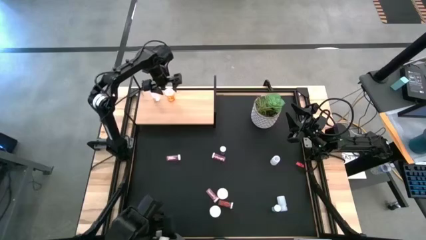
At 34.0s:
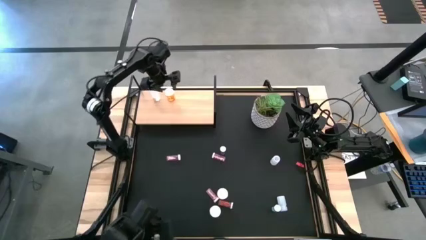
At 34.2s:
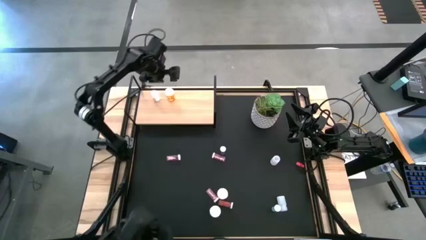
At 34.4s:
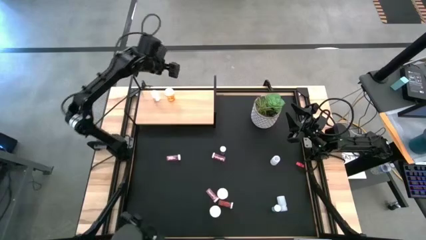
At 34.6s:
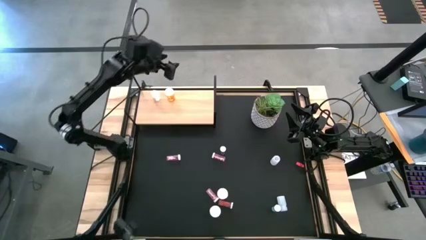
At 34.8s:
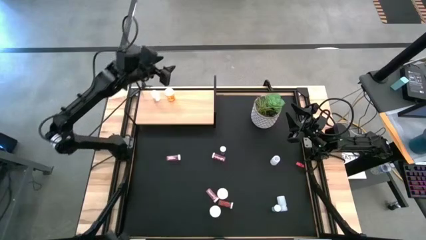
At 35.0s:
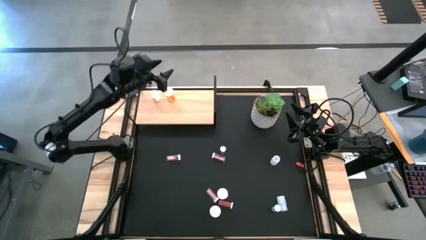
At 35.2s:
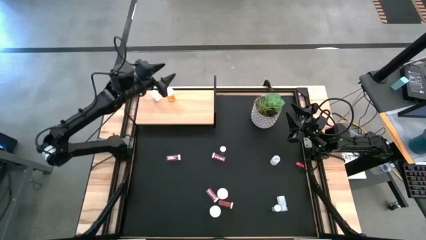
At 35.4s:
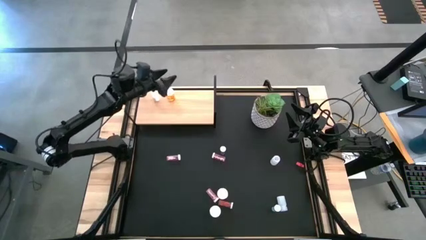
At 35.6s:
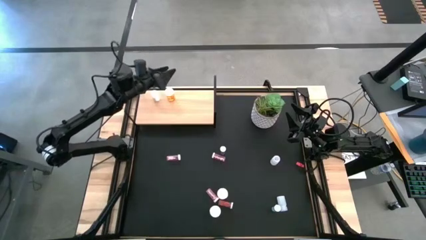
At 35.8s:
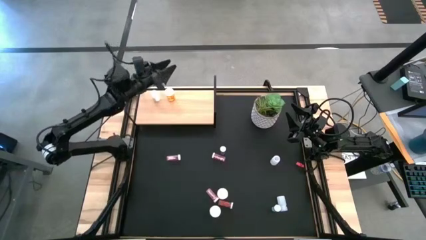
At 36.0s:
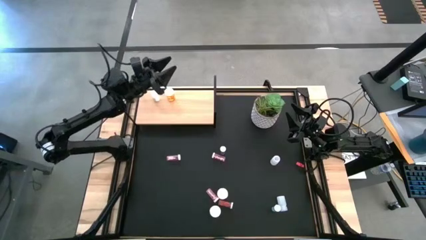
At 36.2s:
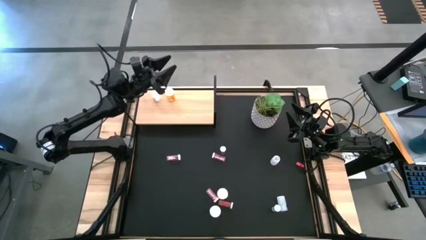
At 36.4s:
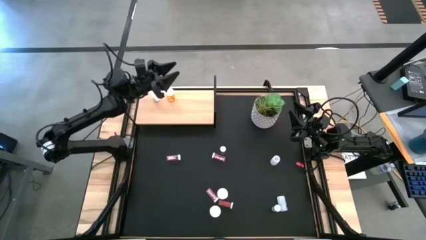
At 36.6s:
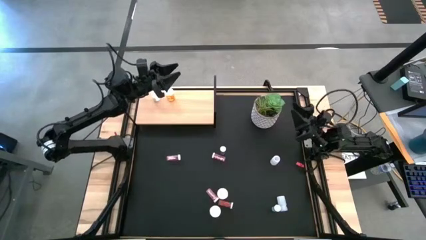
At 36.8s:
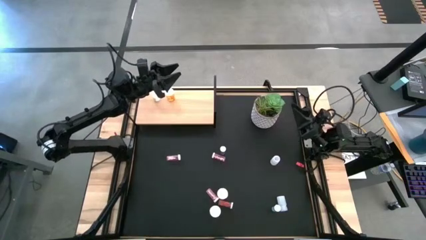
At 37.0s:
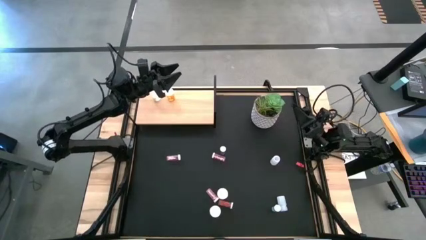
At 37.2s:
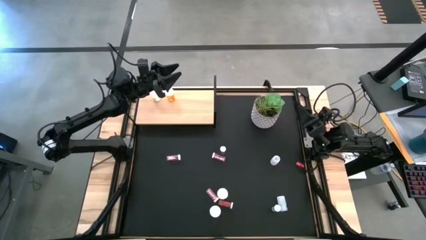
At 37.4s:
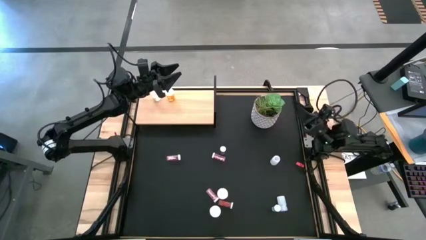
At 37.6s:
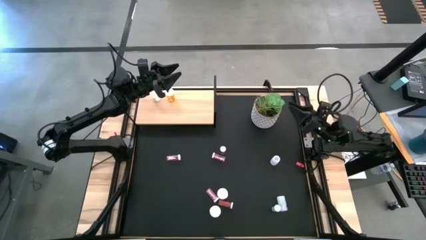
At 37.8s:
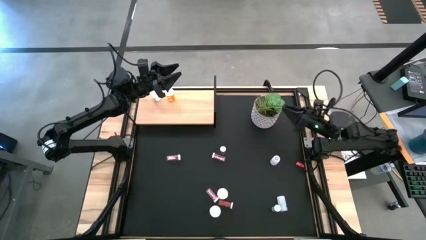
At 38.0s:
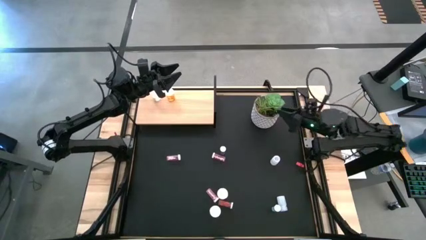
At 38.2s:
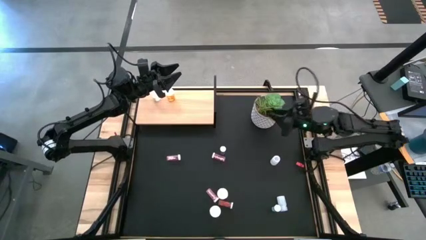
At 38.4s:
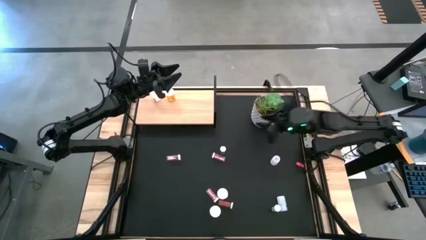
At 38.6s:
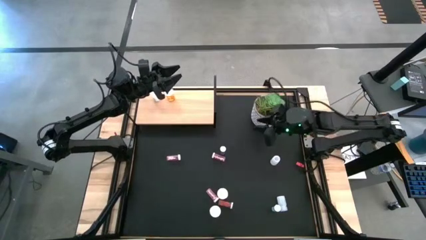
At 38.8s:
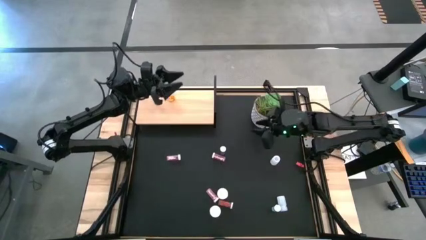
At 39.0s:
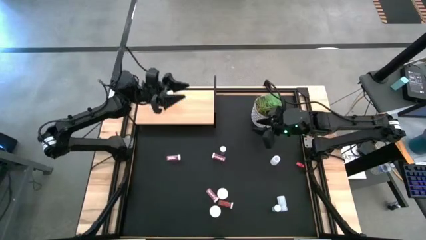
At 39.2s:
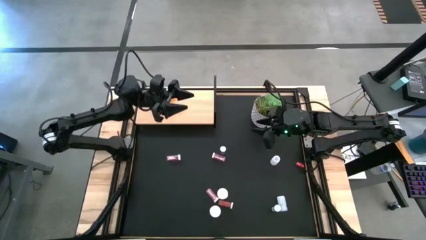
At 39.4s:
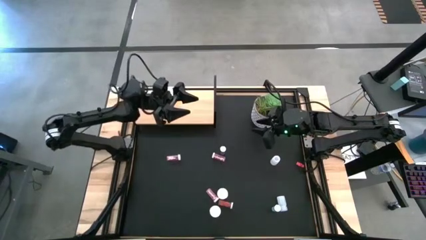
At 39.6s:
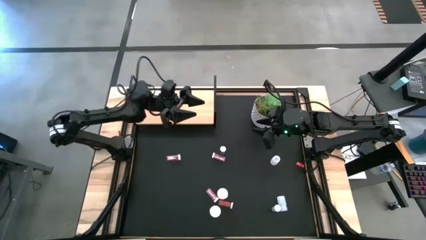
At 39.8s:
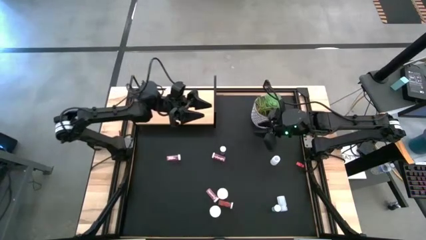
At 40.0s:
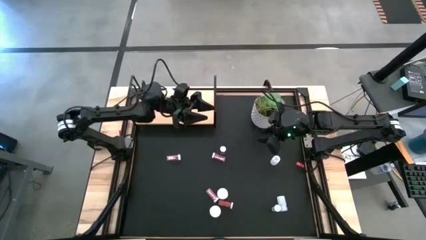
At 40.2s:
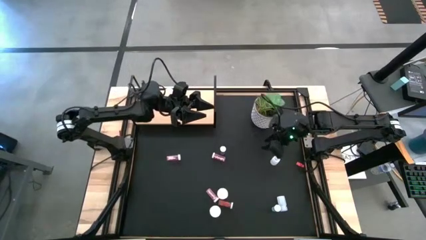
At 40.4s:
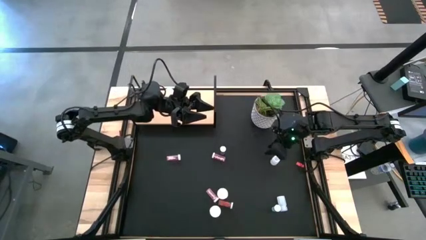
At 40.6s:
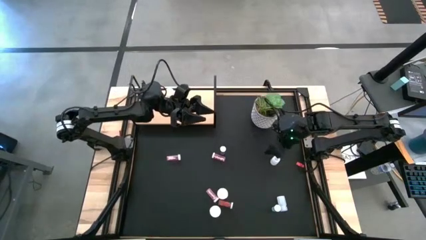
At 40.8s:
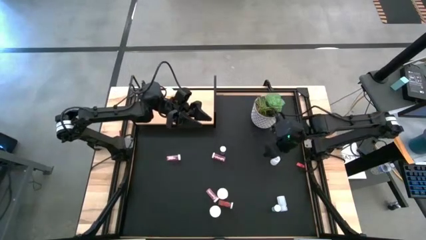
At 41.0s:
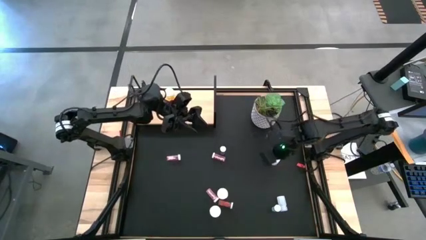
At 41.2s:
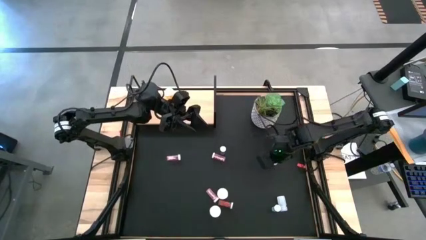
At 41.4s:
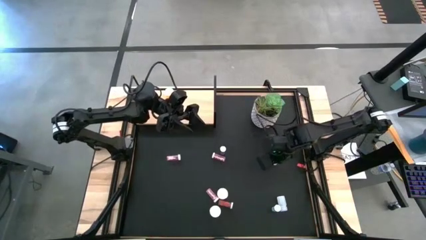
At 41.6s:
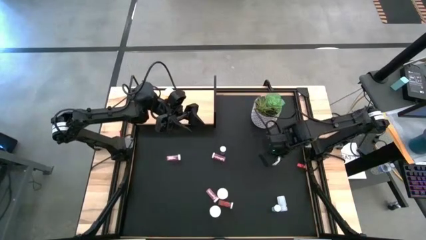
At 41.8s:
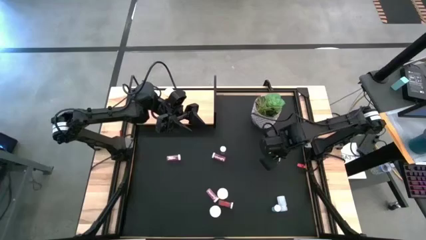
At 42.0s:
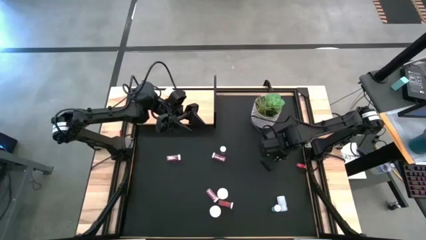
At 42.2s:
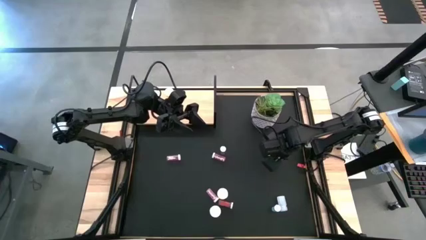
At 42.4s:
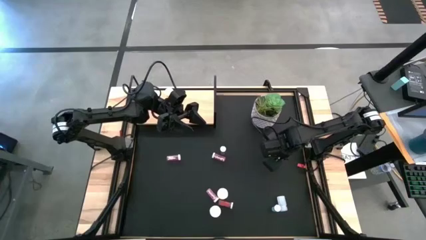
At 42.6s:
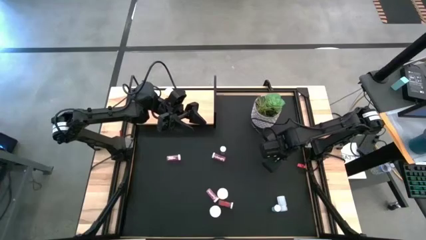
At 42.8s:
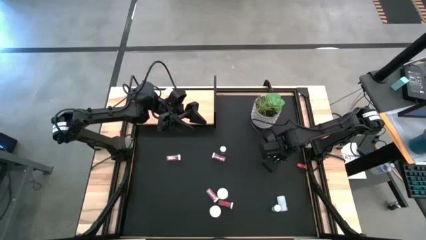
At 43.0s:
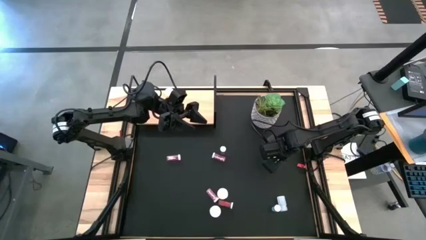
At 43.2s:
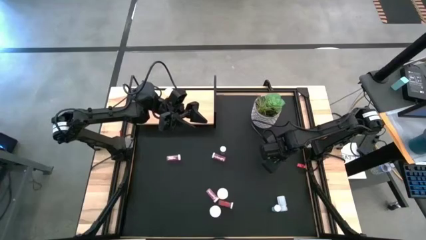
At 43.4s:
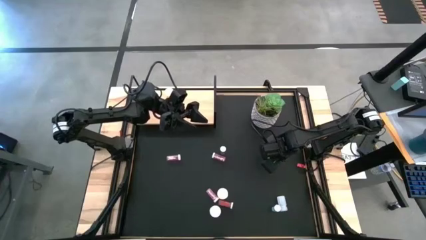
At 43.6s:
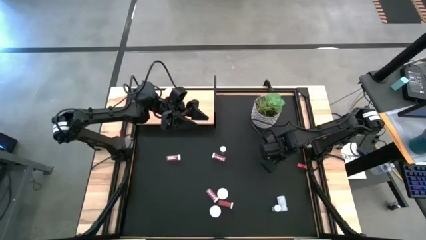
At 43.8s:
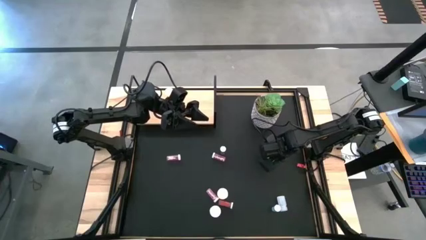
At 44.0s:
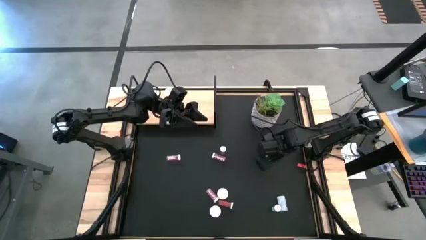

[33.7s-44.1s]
Task: Pick and place medicine bottles onto shelf by color
Put the top white pill bottle on the shelf aligned with the other white pill bottle

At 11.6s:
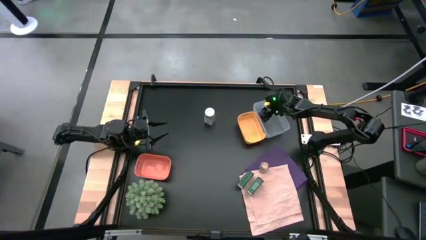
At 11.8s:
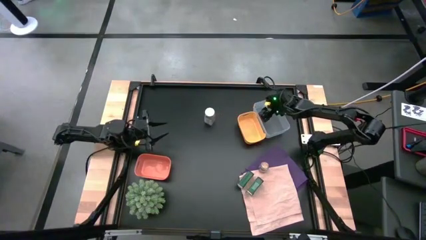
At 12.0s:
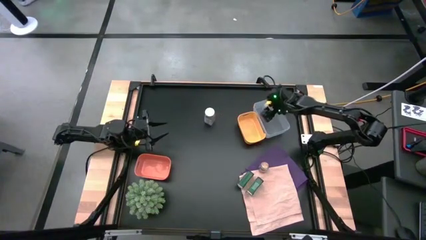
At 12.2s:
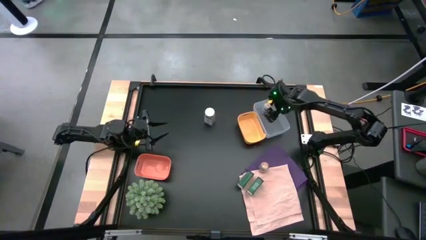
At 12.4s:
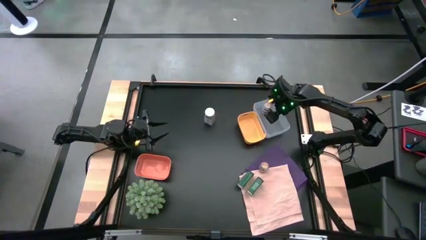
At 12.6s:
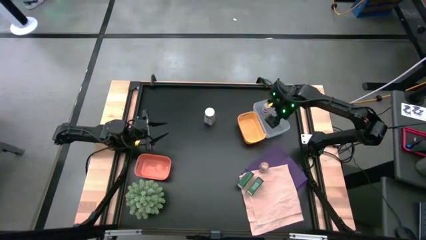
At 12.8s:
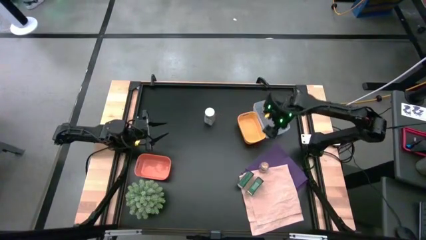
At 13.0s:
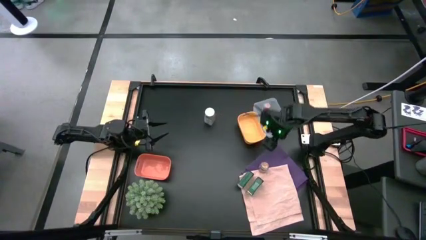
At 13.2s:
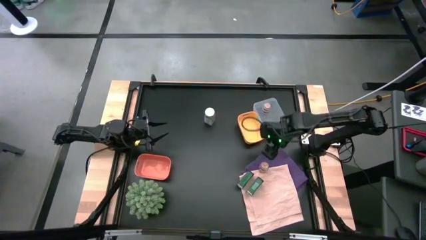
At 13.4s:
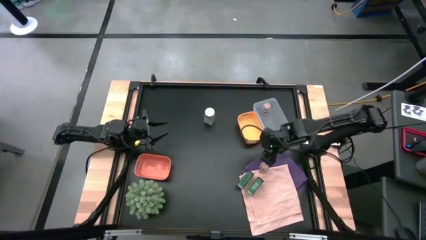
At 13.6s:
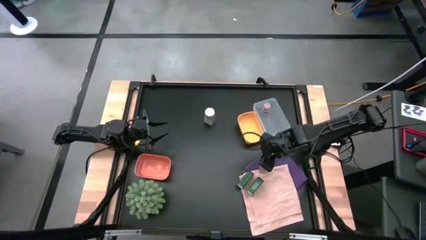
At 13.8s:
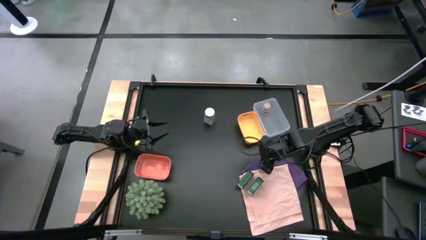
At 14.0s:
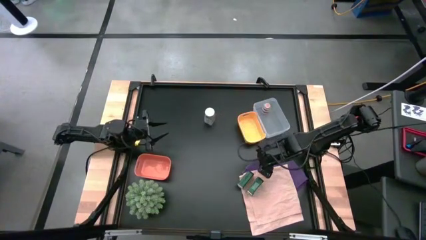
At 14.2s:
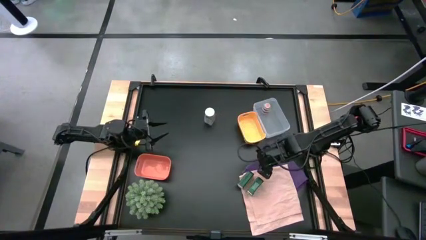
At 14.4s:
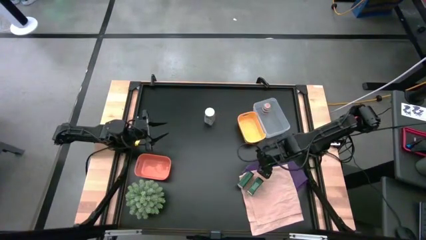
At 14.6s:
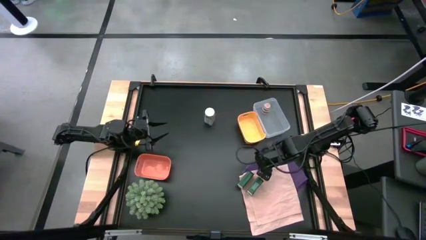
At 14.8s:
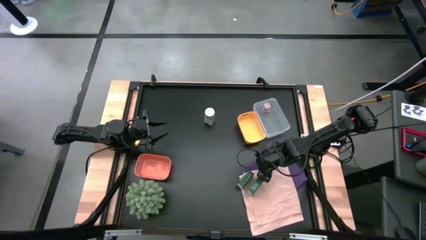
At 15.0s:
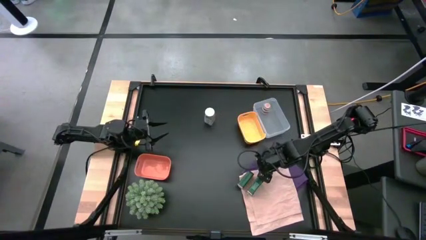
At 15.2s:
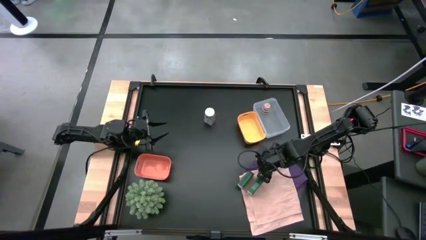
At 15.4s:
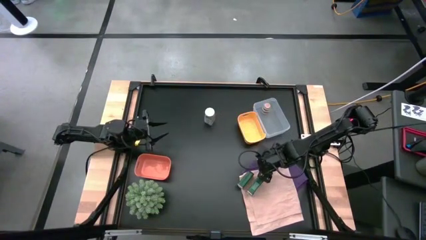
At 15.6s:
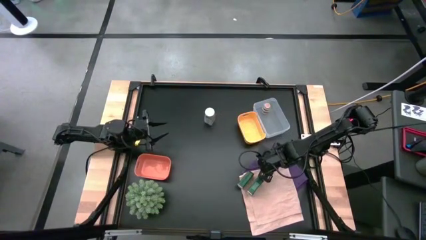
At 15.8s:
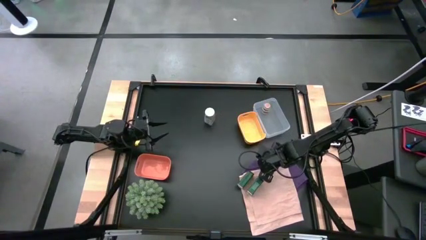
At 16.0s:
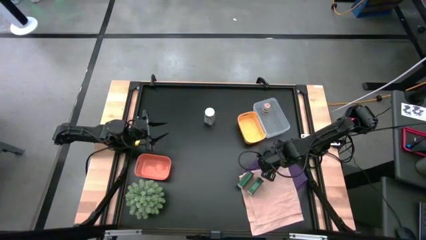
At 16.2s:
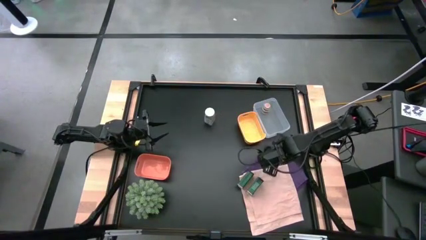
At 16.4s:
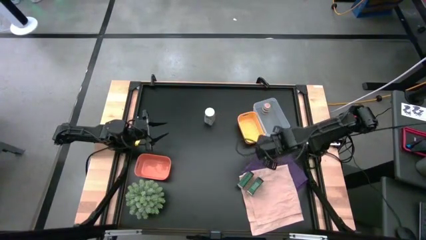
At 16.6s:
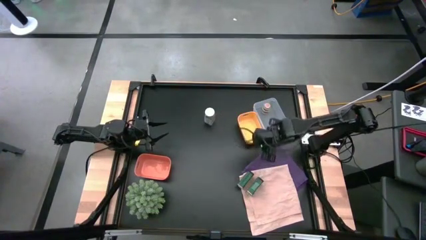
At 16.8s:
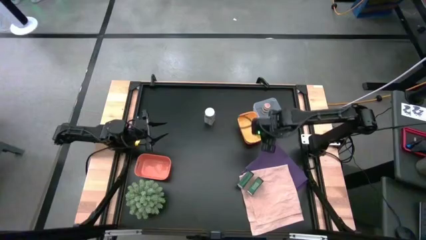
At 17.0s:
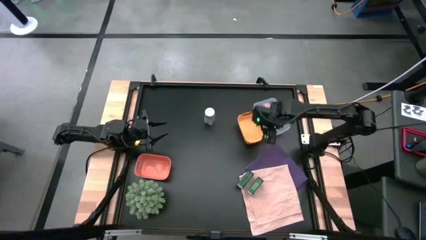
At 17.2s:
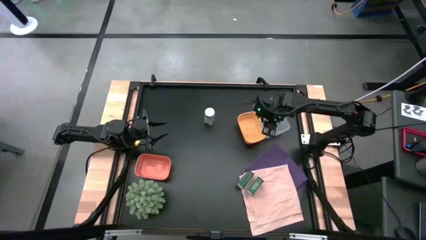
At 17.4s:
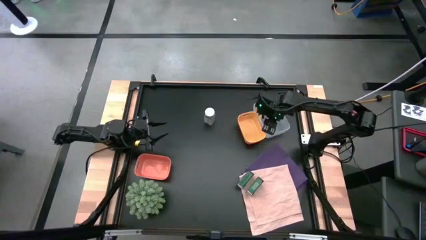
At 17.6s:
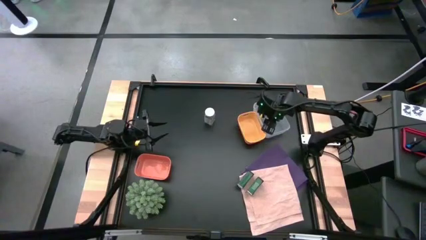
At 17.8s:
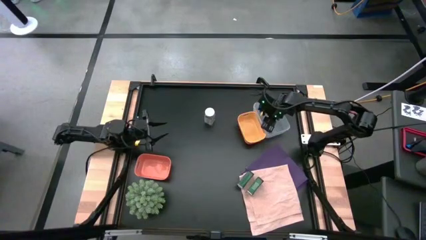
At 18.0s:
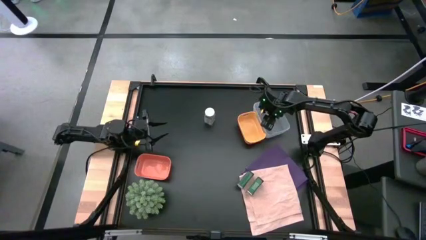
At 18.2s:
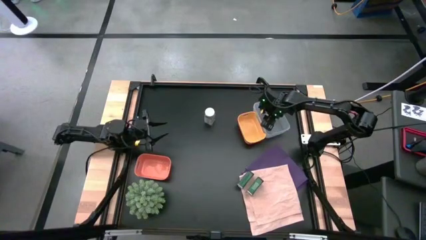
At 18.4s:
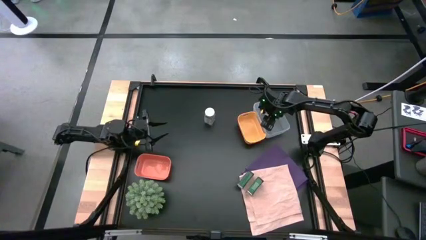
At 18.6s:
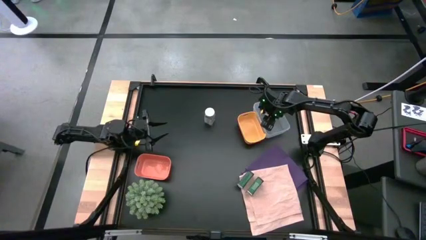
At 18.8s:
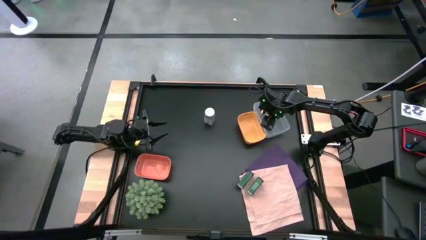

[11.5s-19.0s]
Task: Sort spices by type
Put the brown seasoning bottle into the transparent bin
